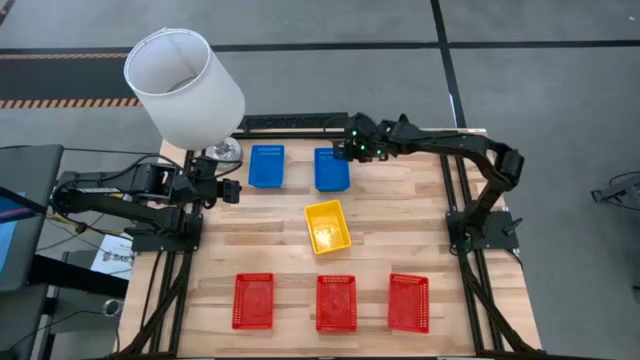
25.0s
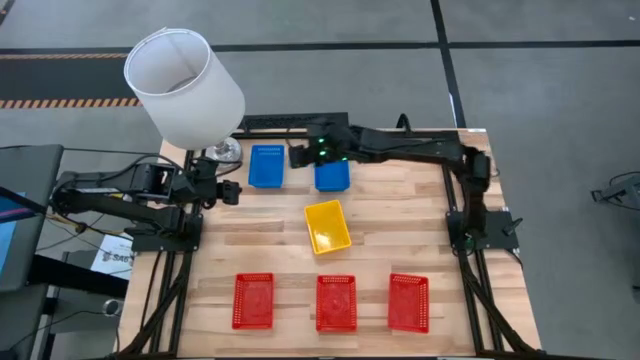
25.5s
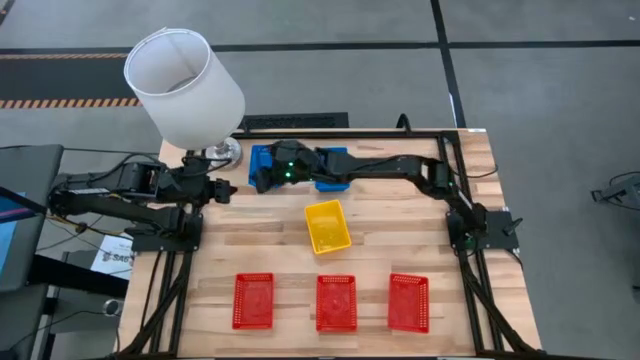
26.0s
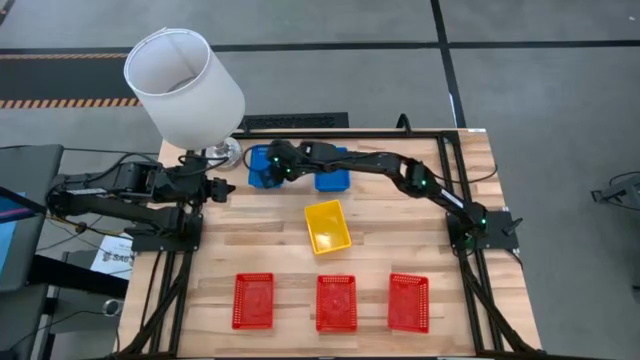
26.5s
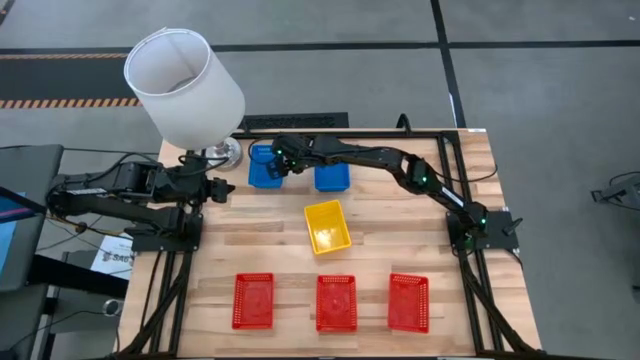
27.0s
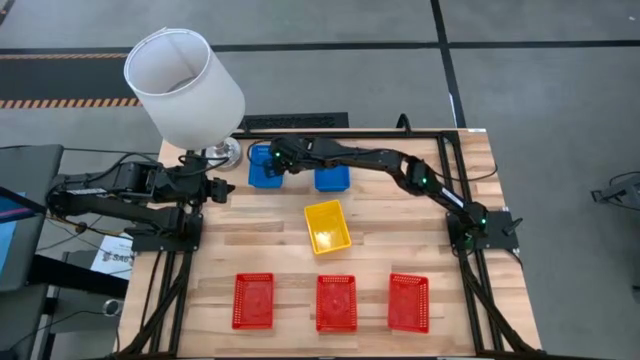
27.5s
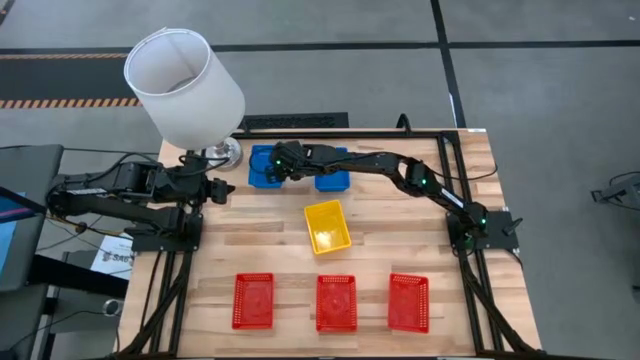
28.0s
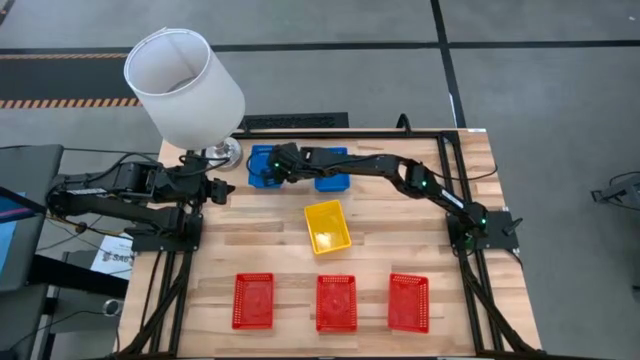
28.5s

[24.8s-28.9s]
Stack the left blue bin on the blue bin

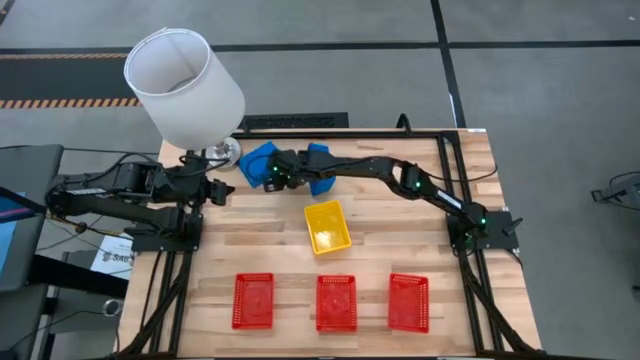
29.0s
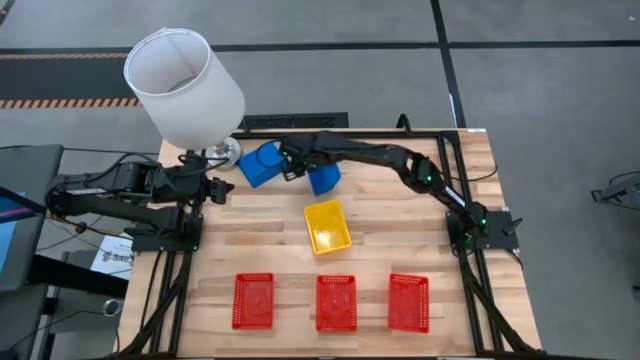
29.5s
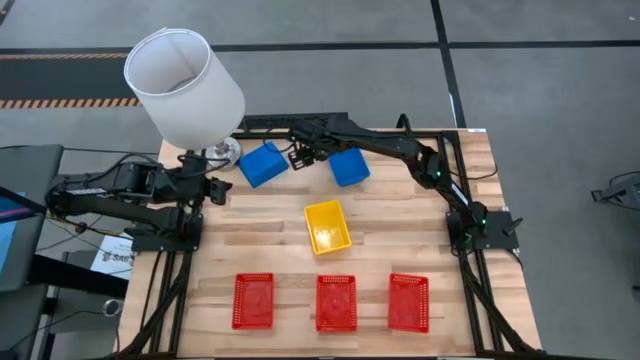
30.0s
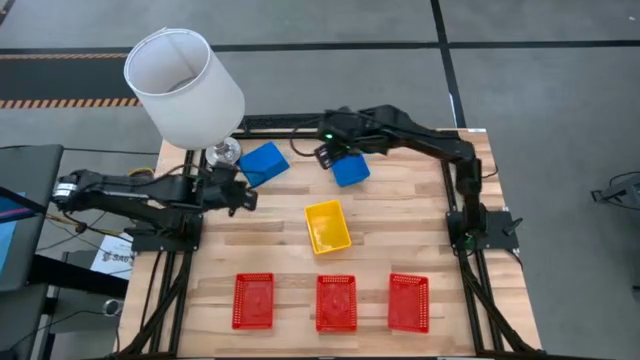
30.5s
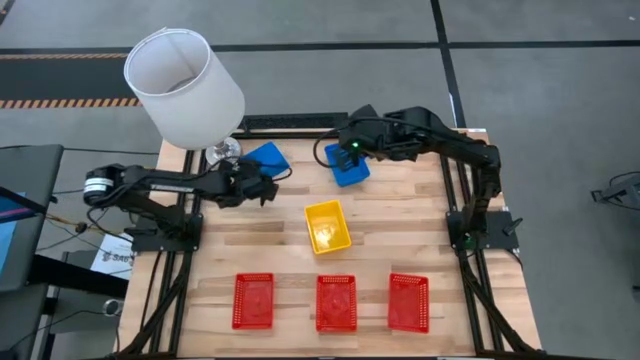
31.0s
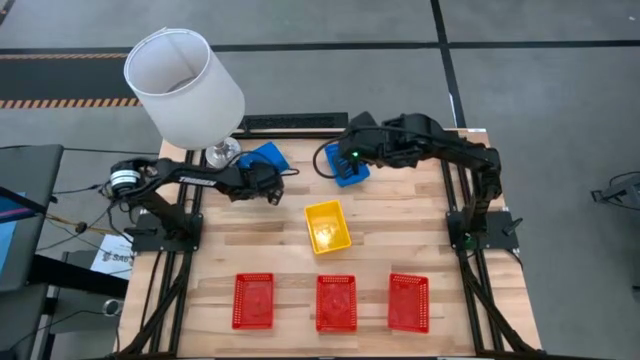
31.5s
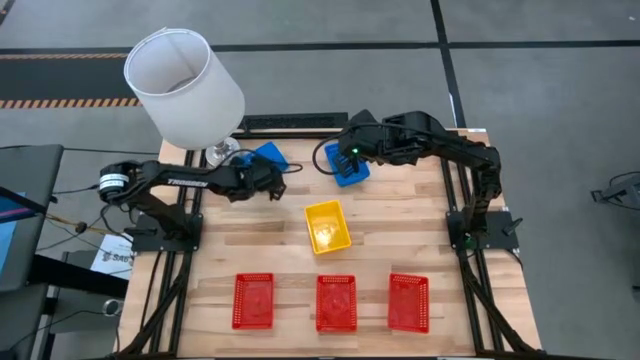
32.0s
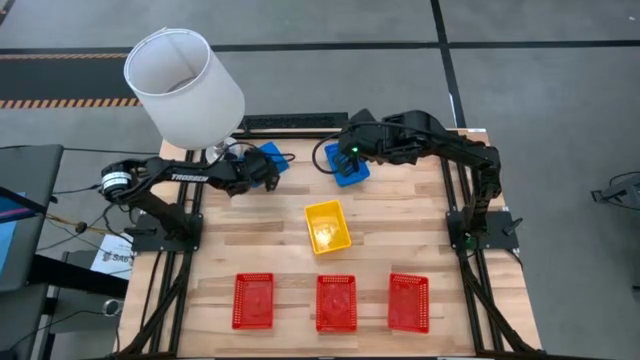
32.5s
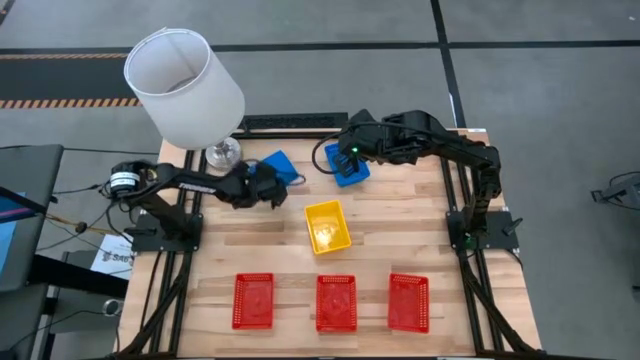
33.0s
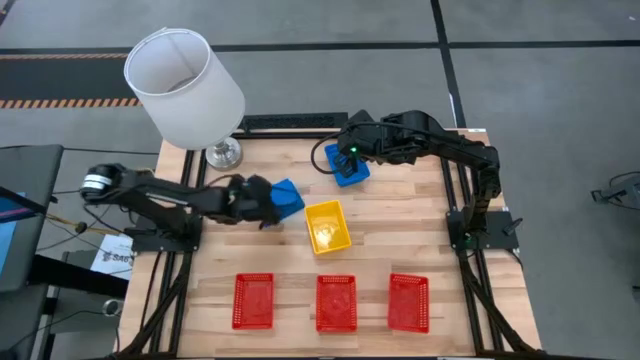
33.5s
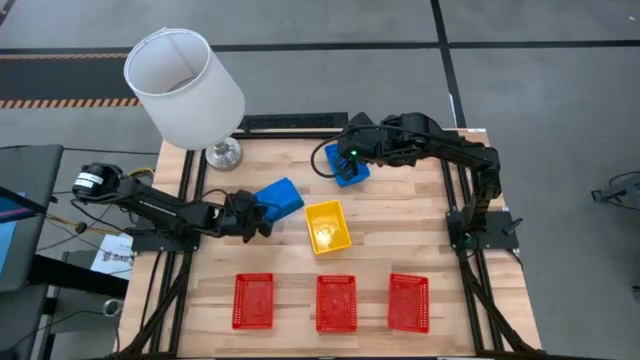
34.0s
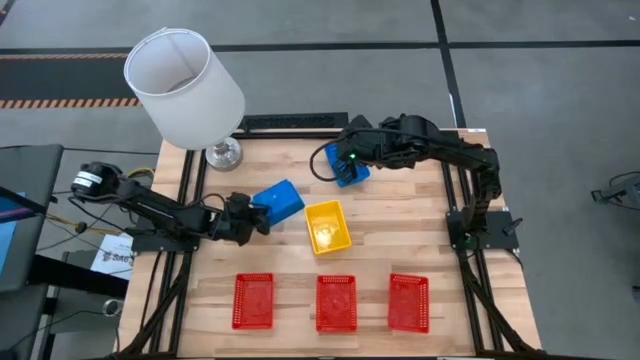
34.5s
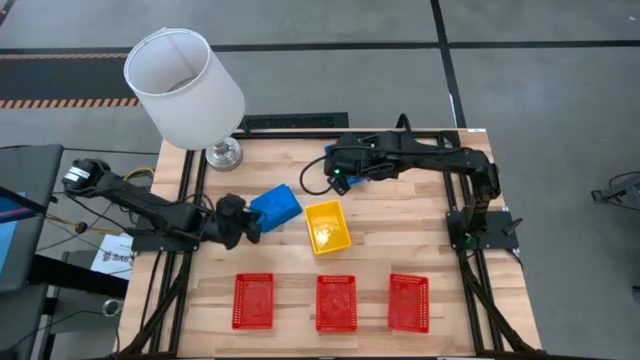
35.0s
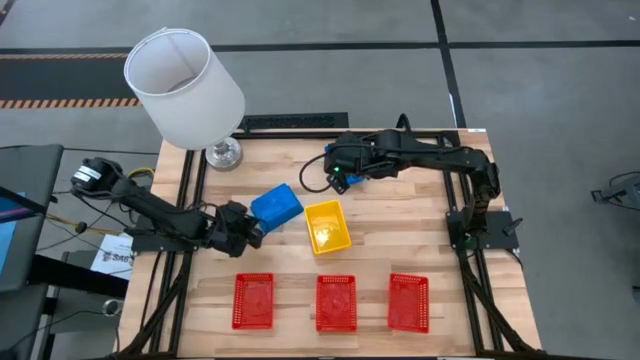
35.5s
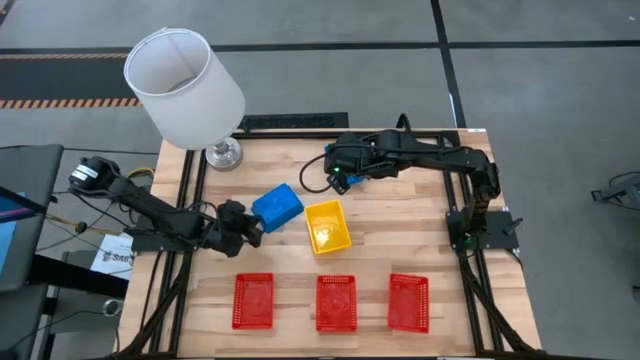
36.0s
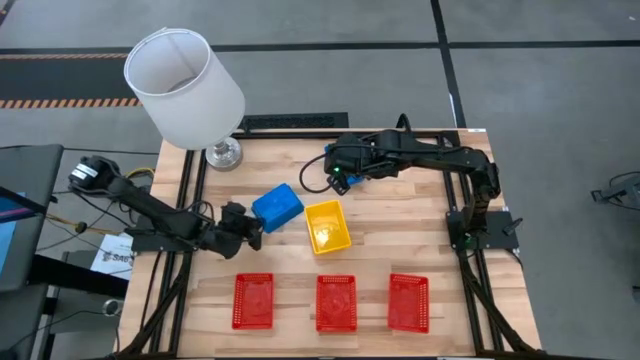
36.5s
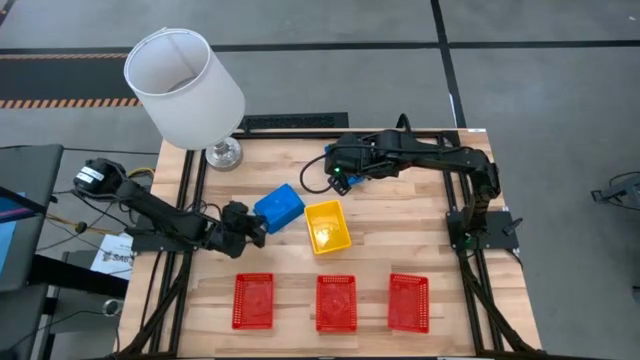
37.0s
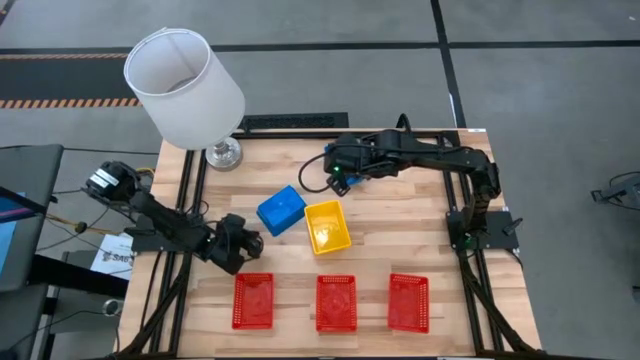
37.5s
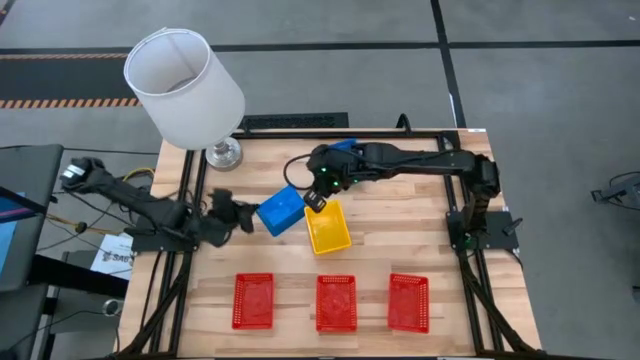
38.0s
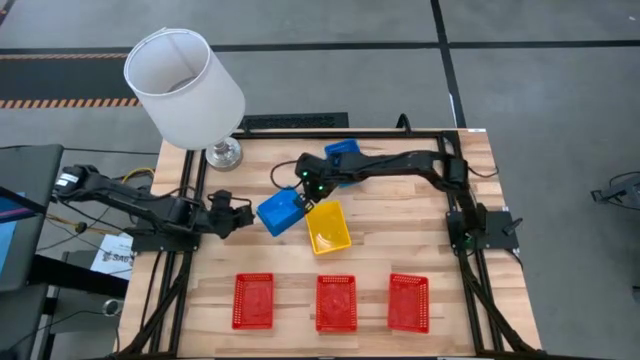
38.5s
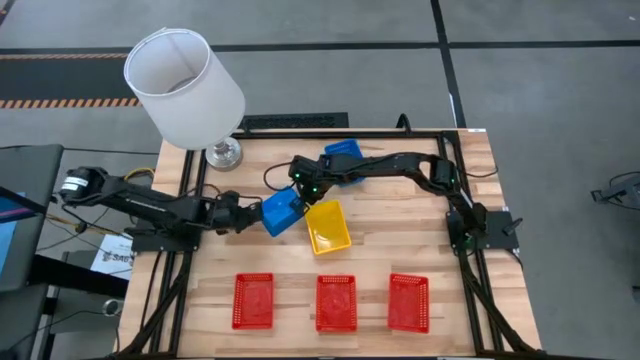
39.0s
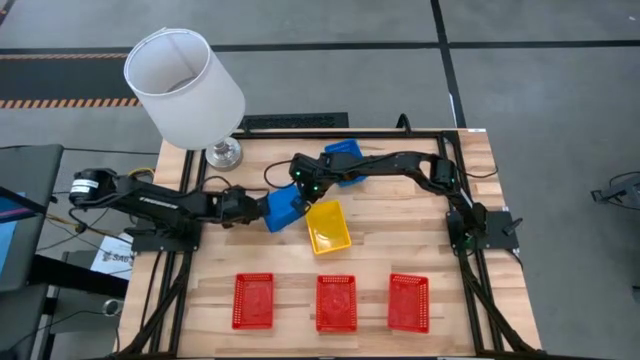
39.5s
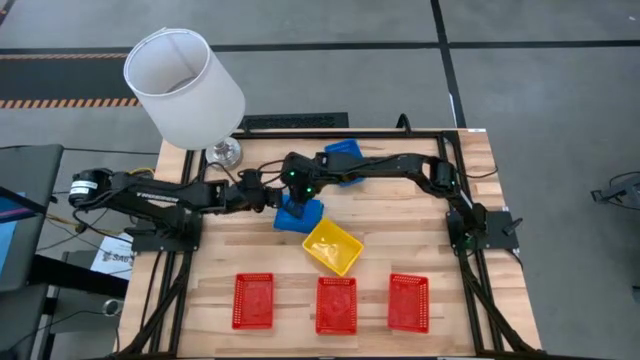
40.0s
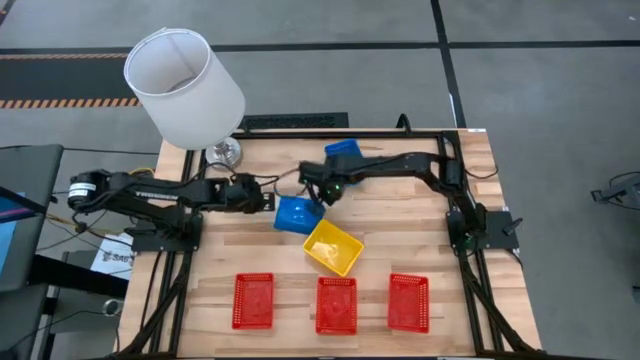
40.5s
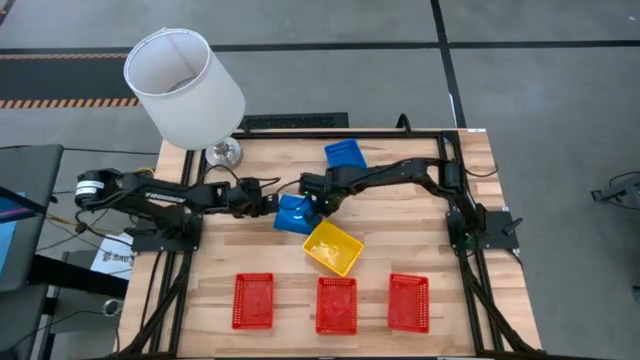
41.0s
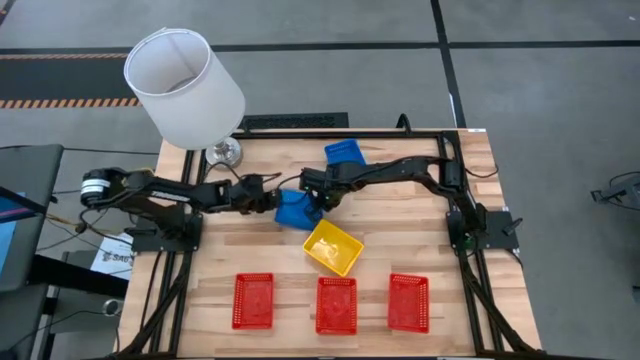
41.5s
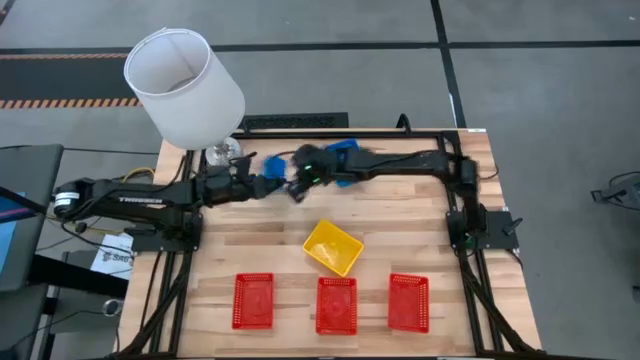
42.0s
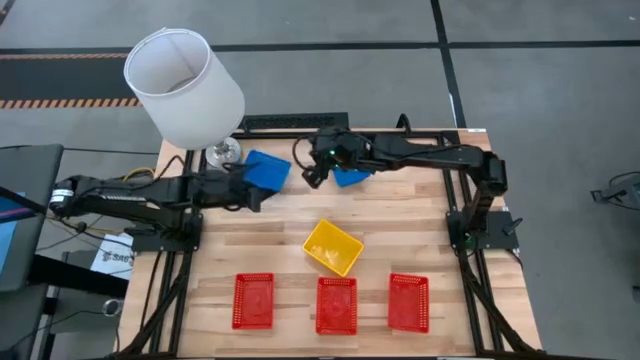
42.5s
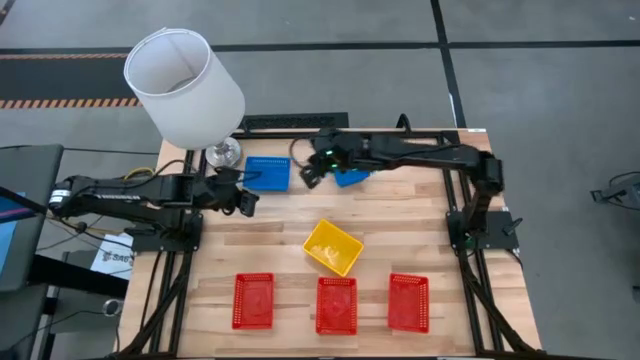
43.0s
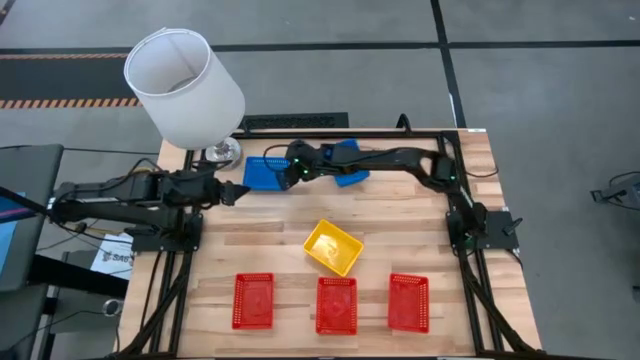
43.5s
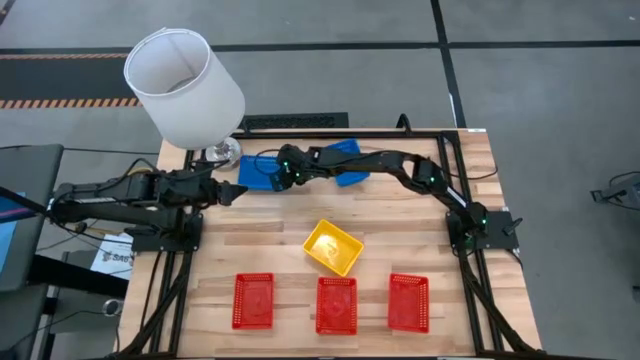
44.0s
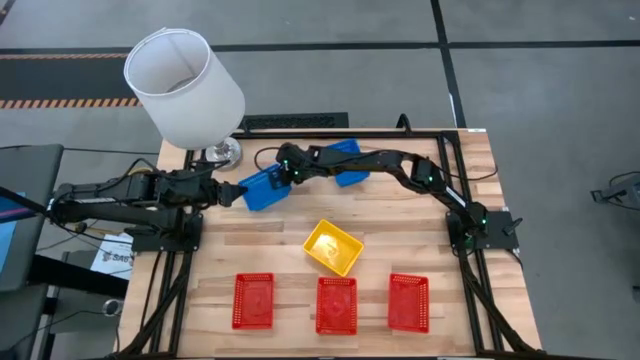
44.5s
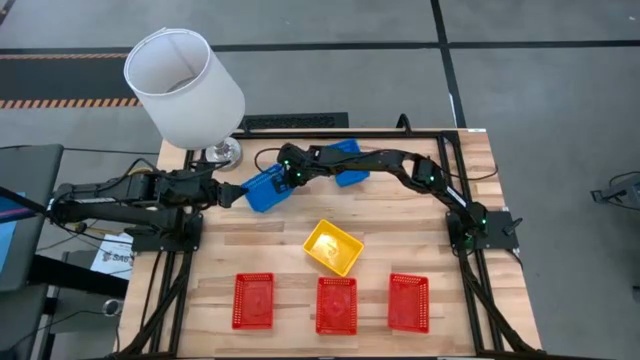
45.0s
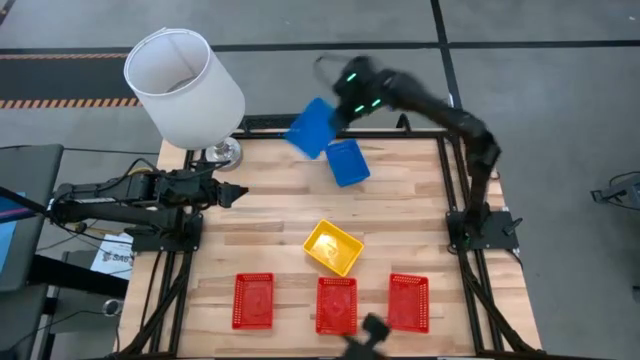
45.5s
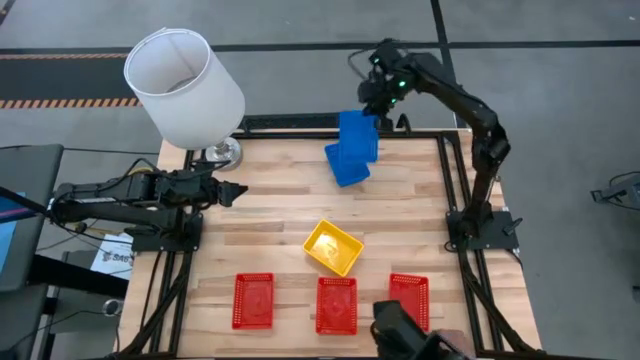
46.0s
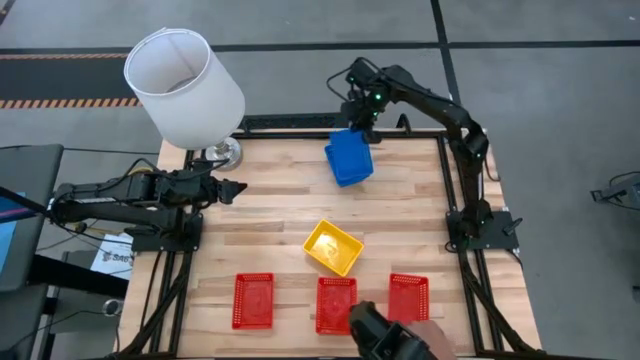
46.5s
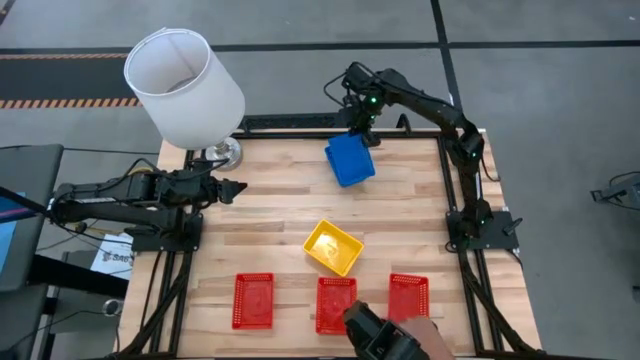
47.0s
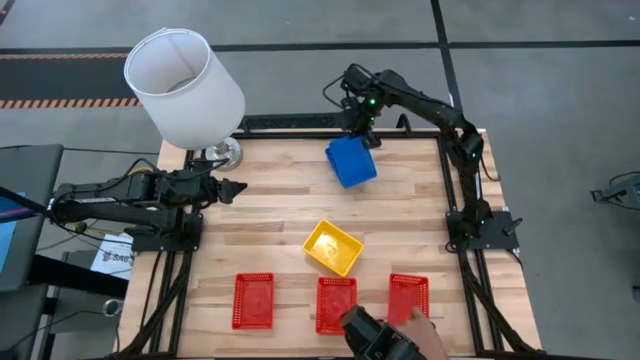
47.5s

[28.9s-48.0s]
Stack the left blue bin on the blue bin
